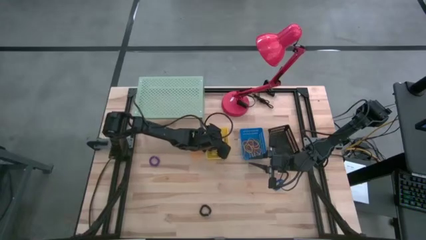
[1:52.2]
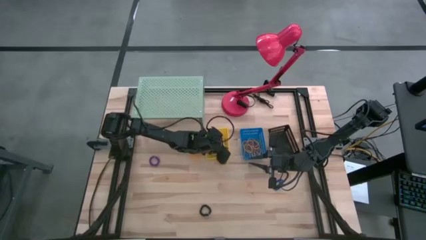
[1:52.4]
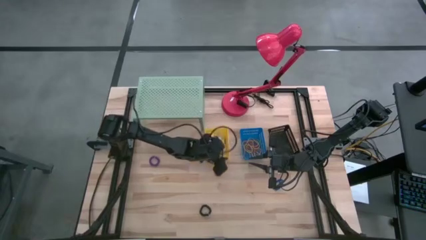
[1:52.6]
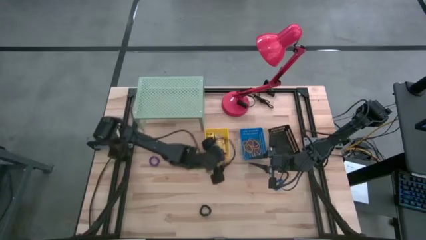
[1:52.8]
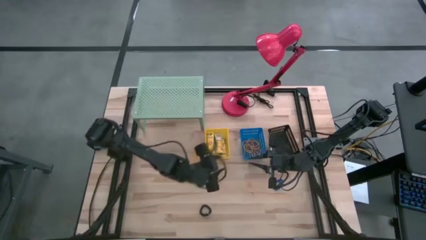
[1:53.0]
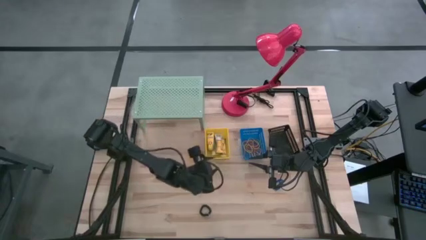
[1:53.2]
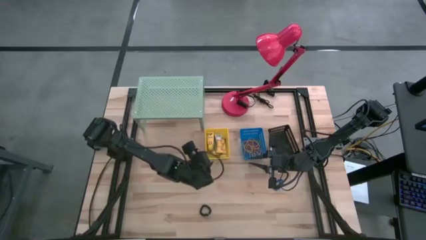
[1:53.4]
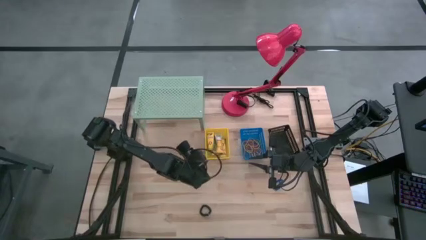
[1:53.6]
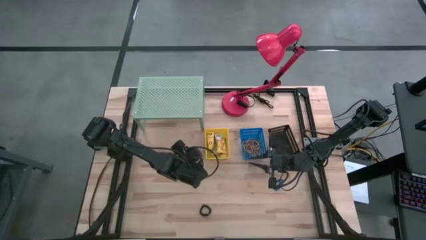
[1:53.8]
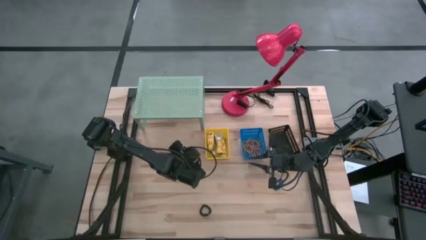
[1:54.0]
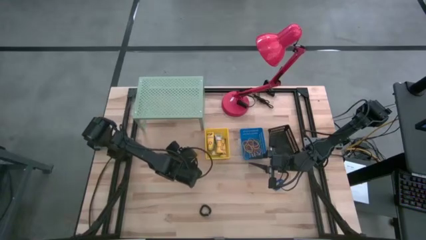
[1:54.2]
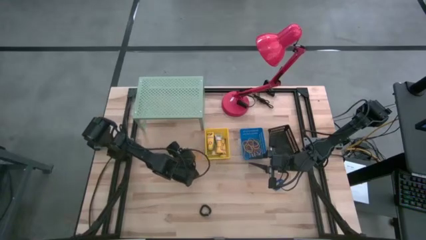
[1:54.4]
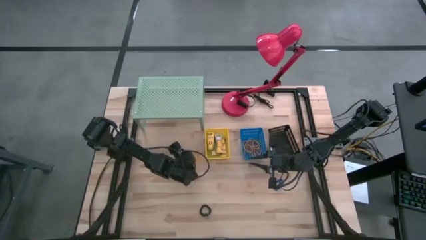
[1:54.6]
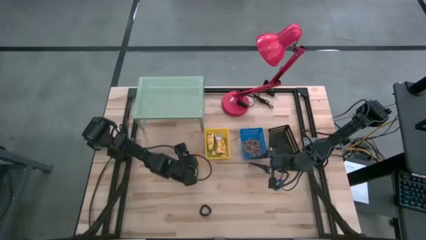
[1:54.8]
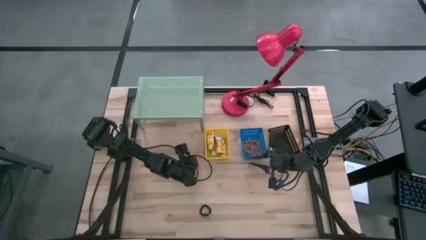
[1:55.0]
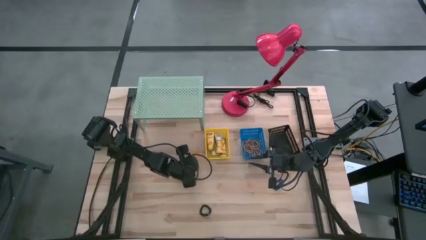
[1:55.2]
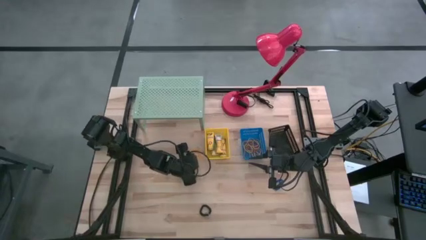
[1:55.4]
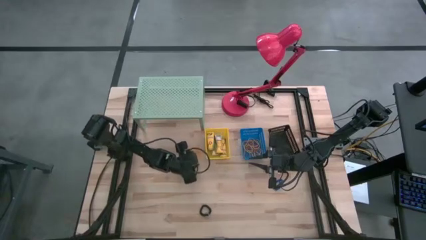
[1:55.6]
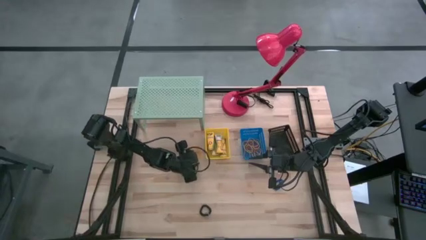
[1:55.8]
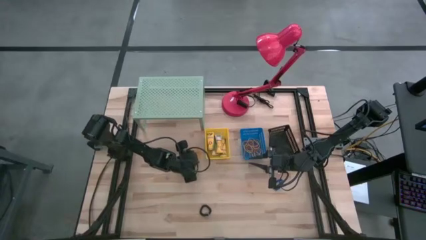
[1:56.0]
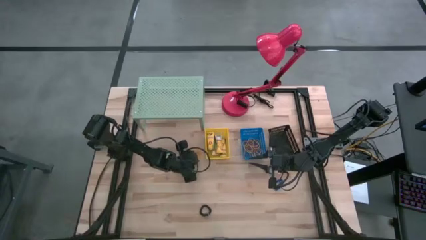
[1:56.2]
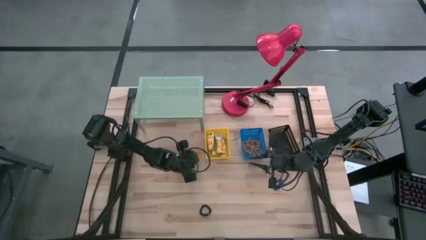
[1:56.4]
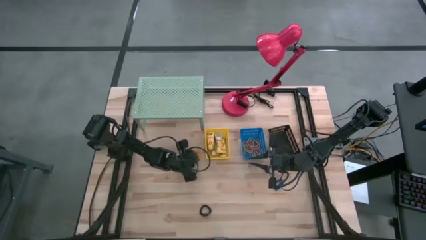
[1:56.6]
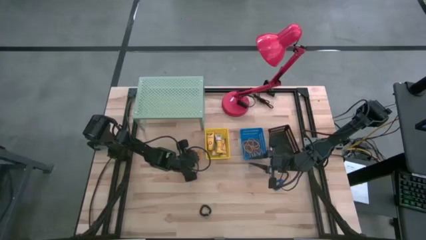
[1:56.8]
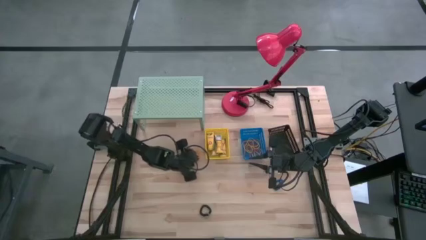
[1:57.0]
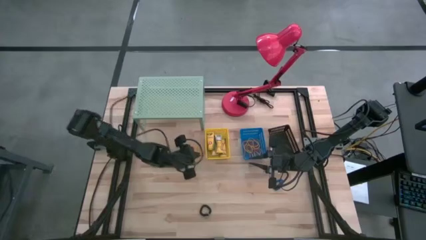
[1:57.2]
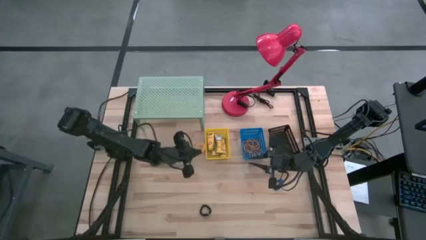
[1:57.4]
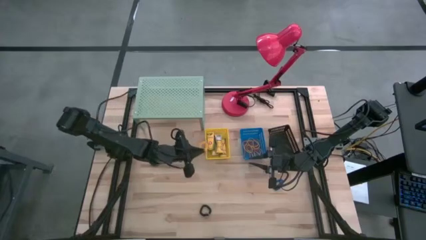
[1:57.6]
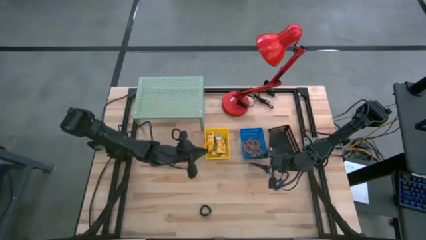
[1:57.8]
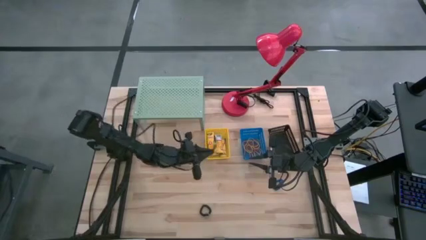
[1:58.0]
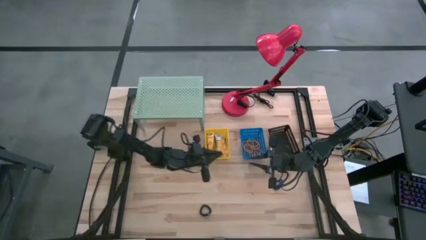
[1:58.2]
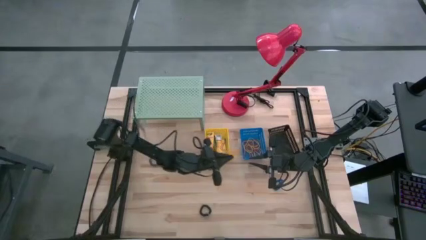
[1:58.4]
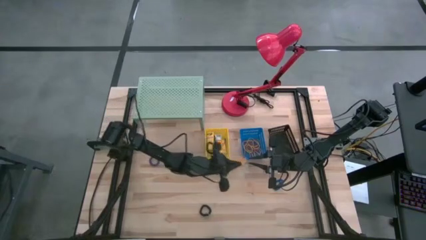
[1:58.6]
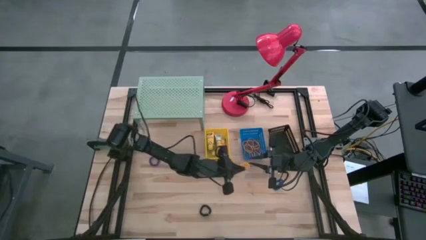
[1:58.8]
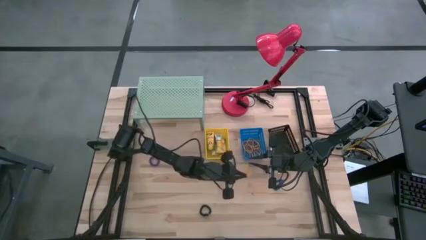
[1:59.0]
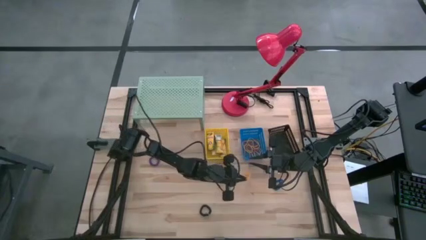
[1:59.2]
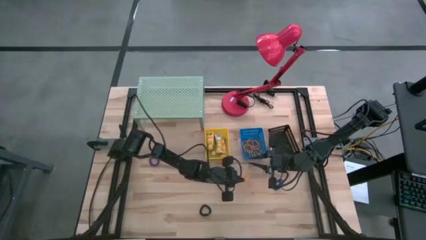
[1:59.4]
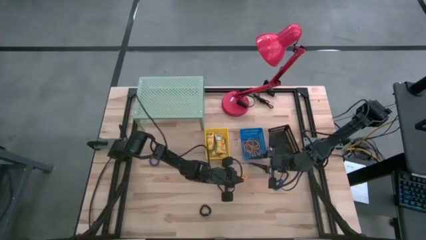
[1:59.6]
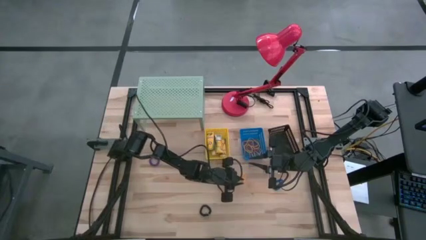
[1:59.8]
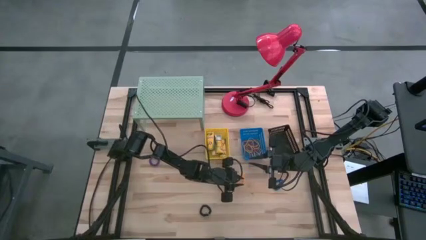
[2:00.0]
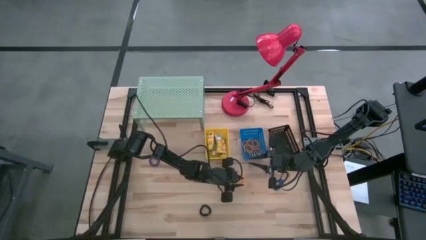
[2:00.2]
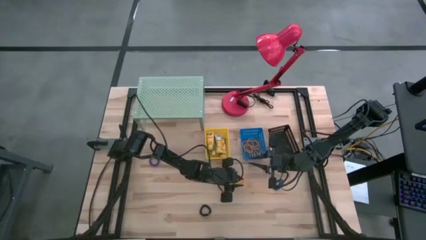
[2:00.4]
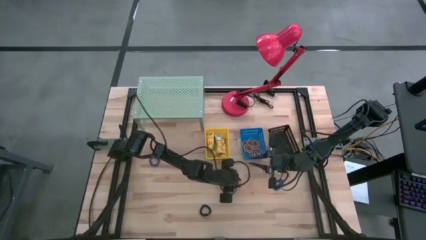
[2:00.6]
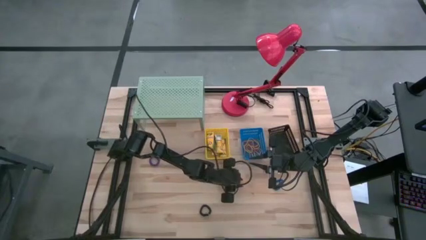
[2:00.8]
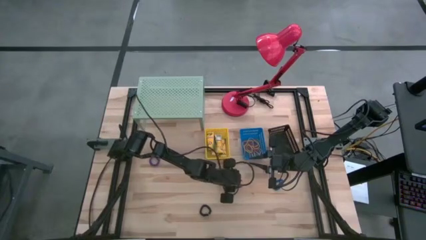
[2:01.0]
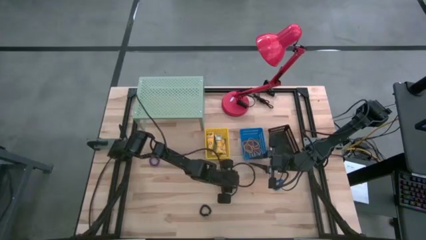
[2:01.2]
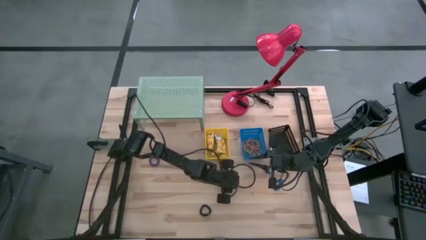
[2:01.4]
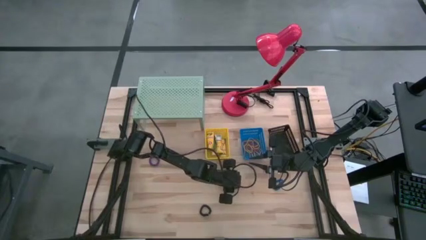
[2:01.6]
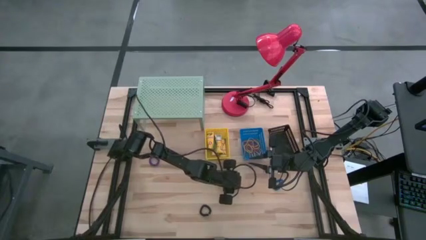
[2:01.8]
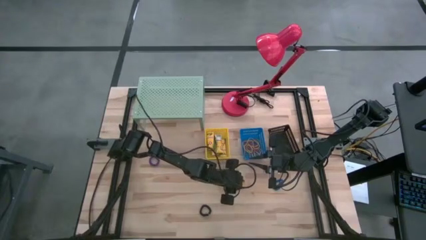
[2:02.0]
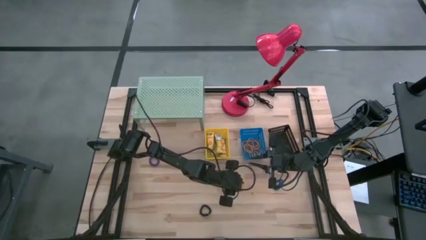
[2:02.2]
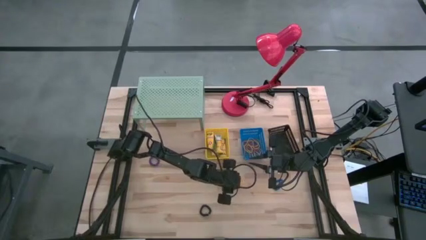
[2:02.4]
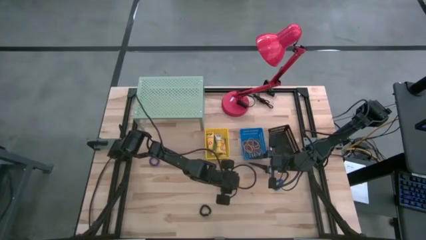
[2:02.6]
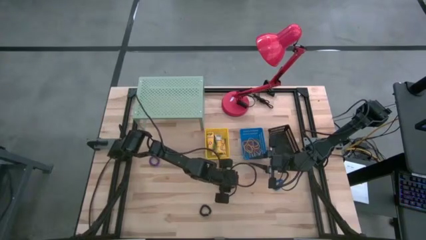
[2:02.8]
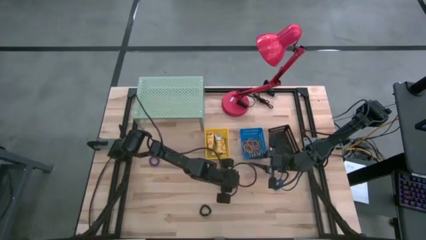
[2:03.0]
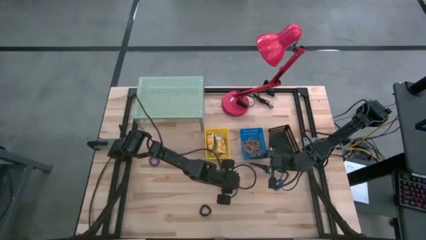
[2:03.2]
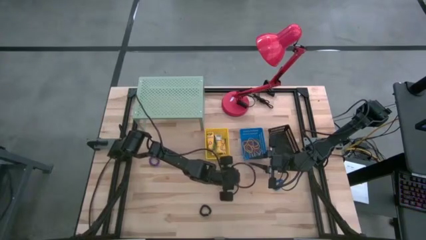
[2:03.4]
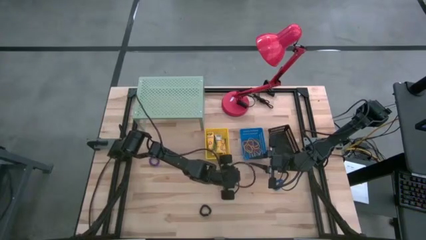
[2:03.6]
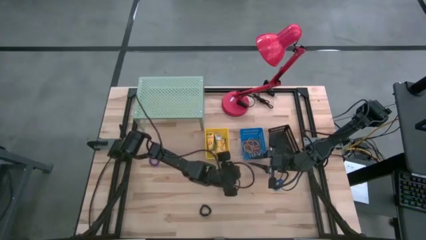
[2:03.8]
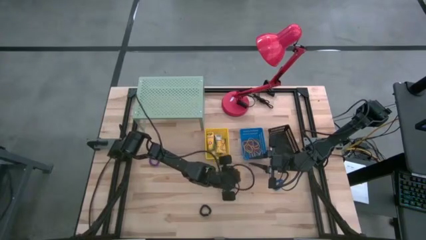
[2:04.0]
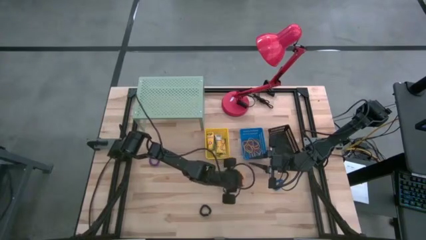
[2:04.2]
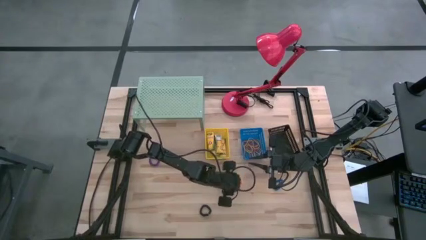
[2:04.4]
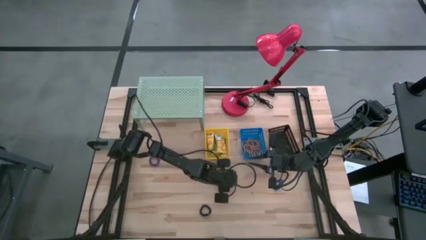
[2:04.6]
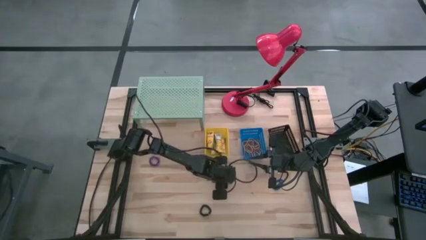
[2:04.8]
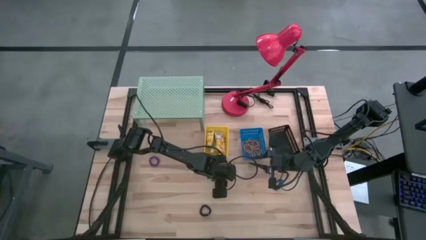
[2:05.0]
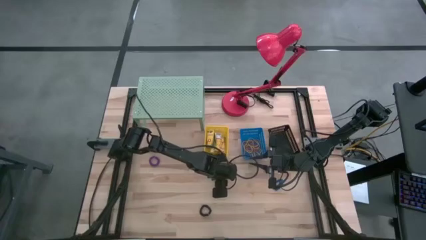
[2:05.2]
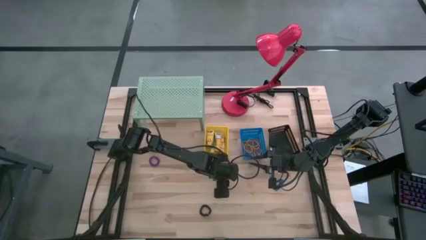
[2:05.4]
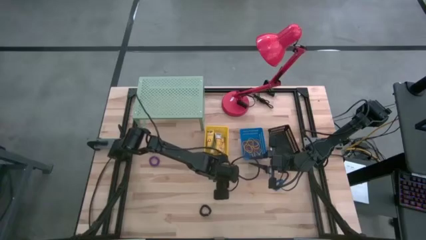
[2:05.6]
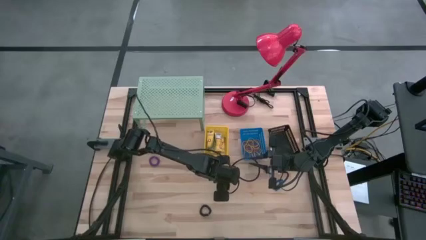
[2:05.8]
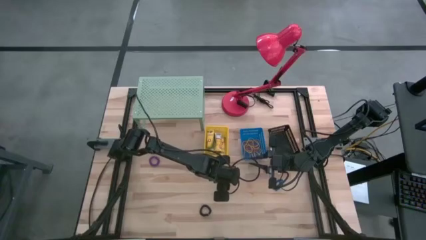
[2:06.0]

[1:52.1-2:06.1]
Task: Pick & Place Office Desk Supplies
Put the yellow spring keychain into the black basket

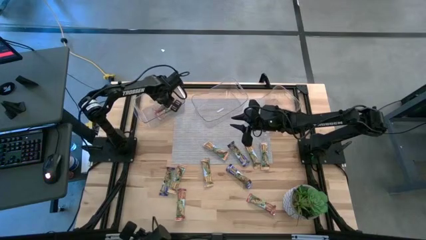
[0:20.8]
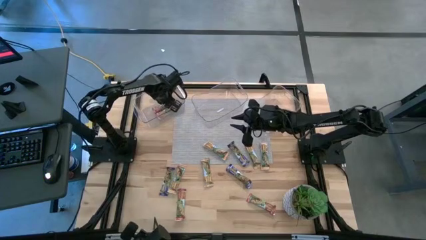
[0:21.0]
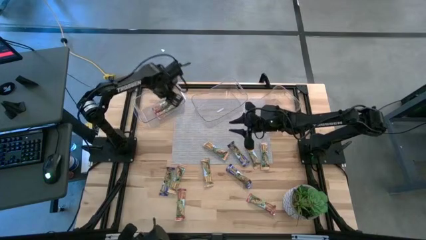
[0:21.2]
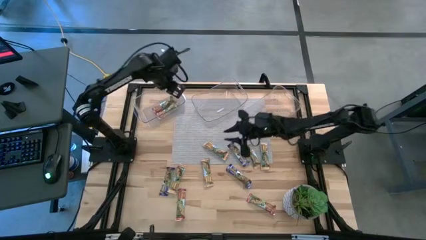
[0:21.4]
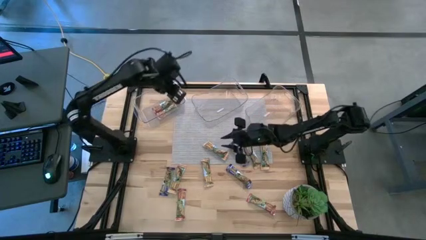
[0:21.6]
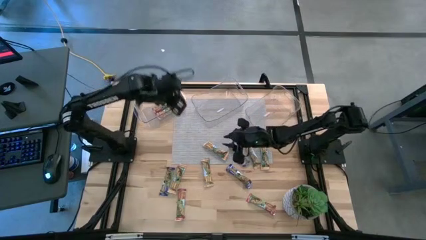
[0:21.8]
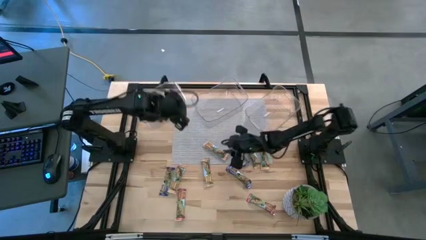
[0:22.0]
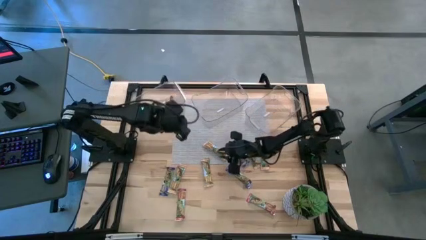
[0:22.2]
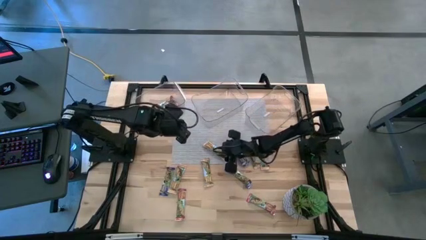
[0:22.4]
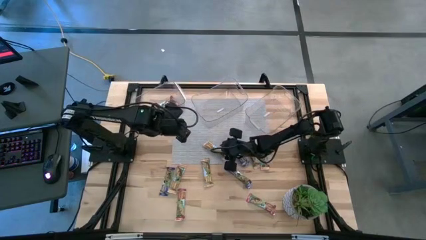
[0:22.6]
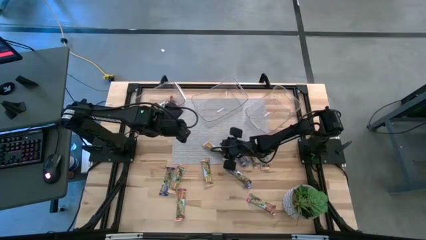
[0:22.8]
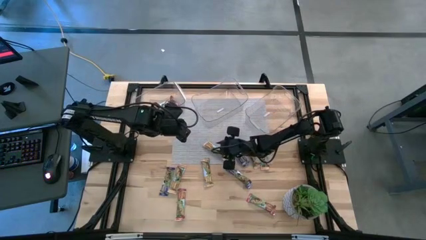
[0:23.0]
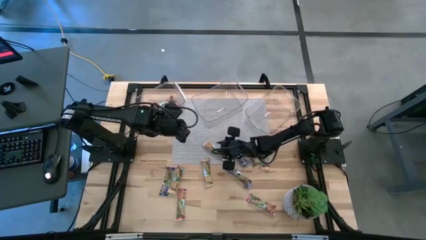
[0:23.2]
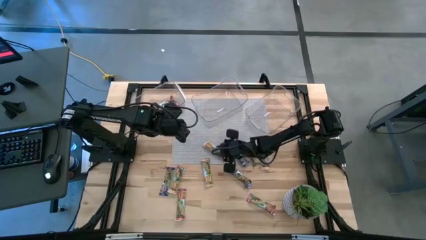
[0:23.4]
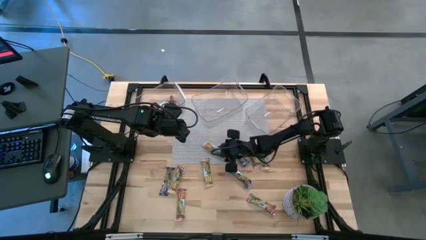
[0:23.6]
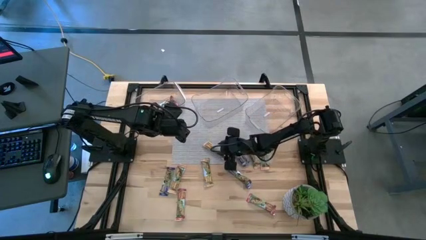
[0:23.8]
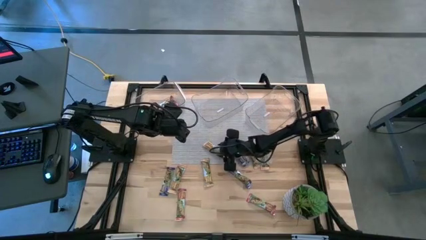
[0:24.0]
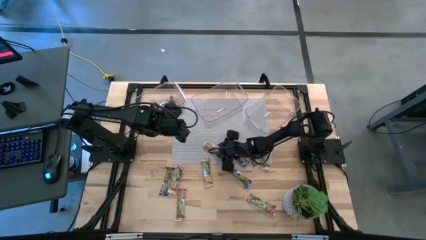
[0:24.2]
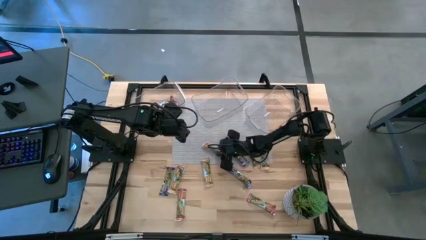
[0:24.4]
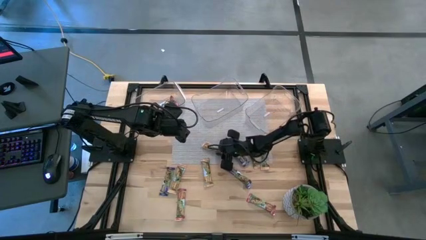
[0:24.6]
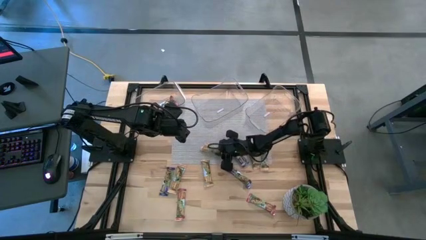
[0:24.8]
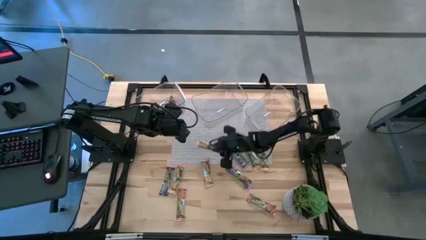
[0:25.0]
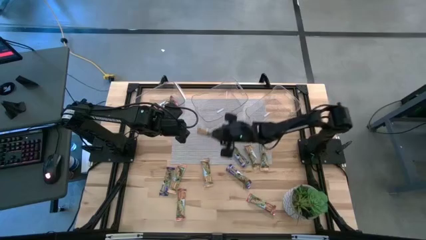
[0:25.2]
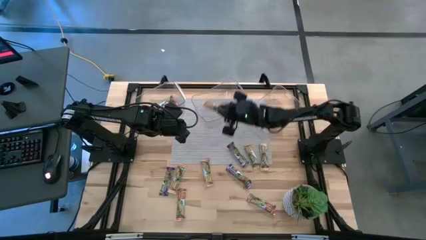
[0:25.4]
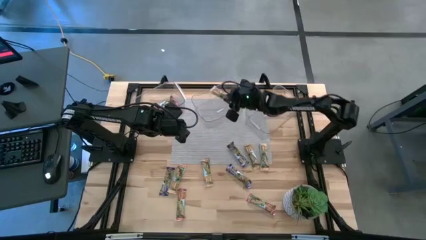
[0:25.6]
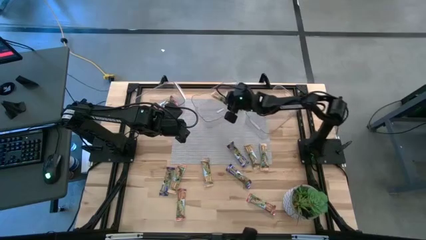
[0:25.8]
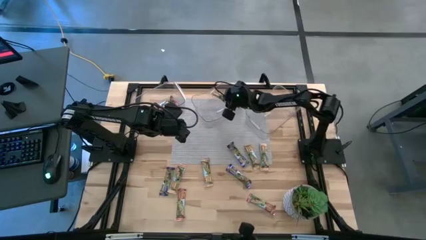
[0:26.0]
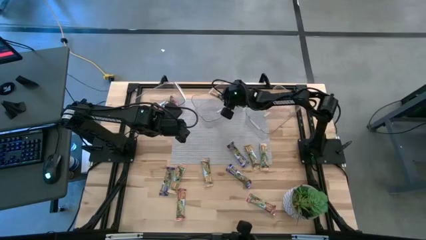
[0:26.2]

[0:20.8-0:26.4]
Task: Pick and place Granola Bars by type
Put the yellow granola bar into the middle transparent bin
